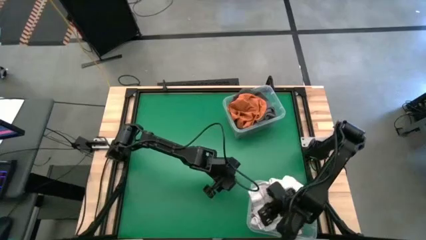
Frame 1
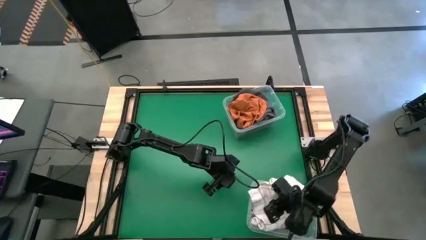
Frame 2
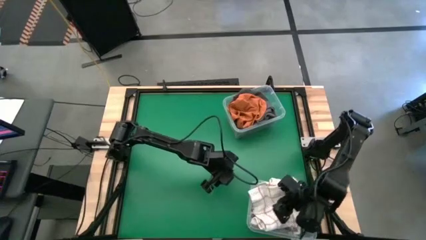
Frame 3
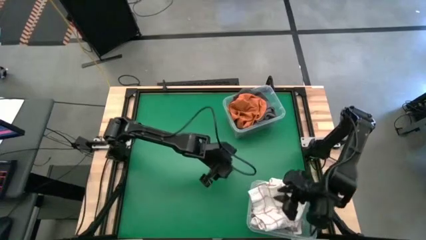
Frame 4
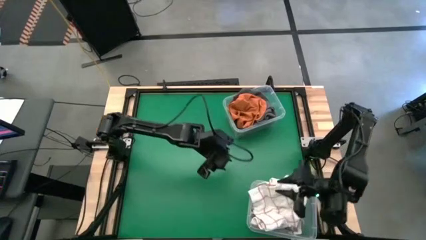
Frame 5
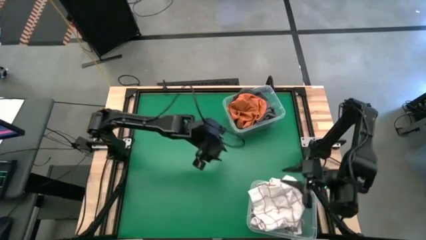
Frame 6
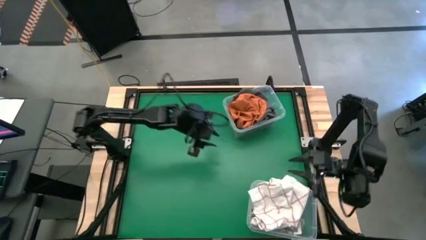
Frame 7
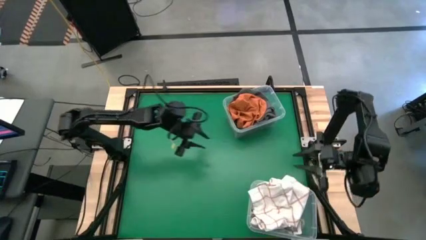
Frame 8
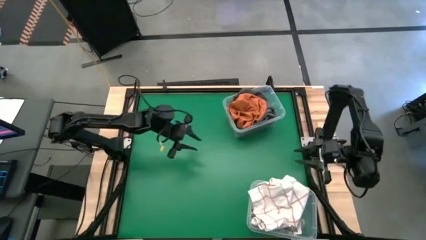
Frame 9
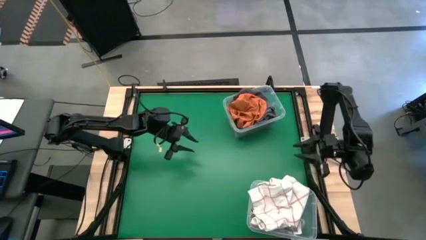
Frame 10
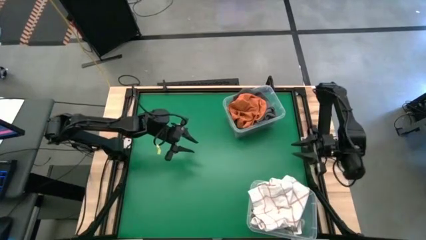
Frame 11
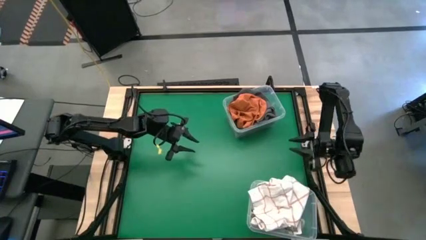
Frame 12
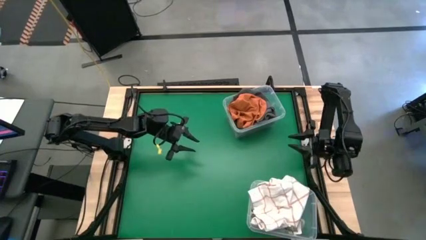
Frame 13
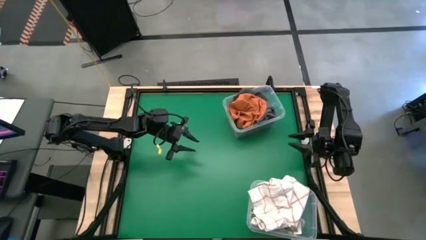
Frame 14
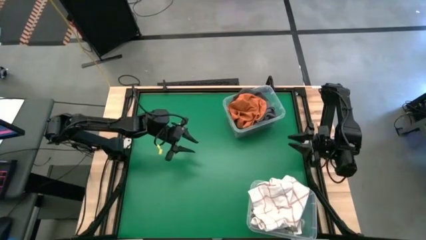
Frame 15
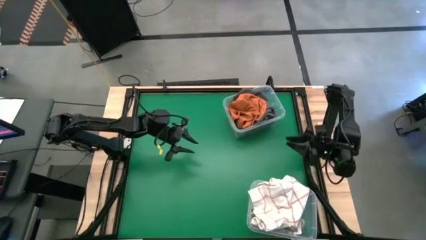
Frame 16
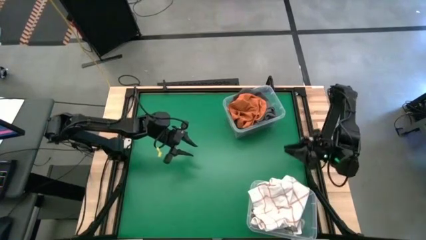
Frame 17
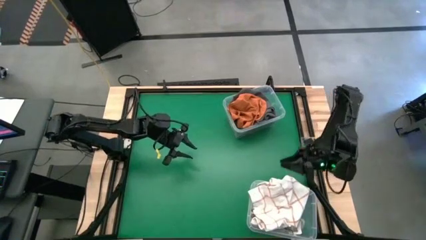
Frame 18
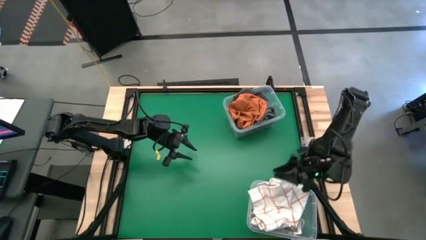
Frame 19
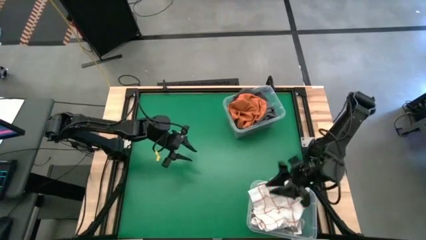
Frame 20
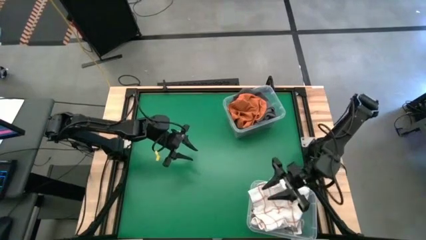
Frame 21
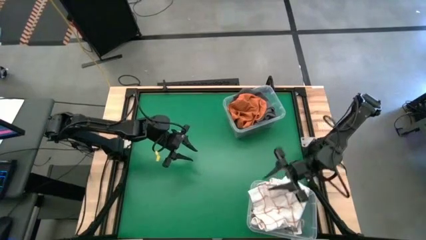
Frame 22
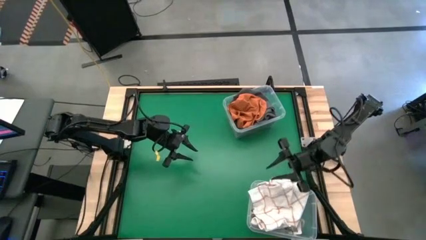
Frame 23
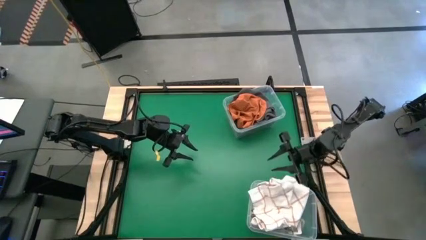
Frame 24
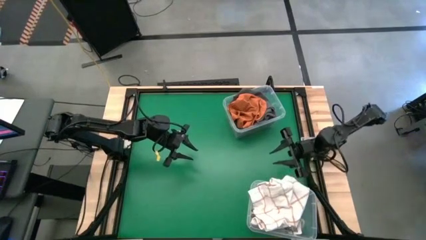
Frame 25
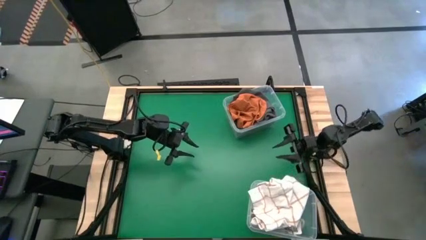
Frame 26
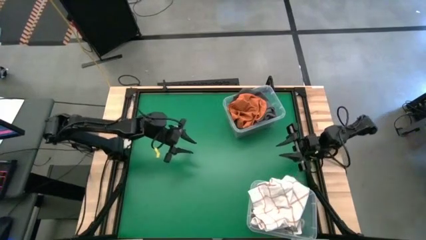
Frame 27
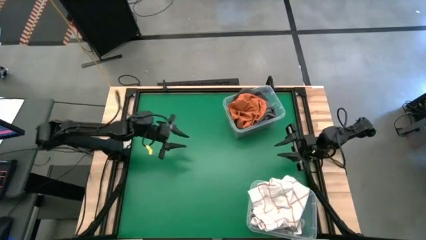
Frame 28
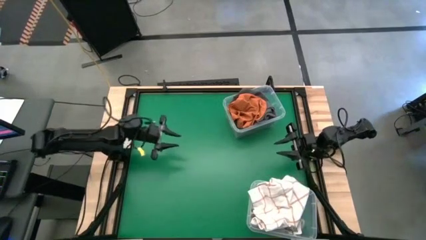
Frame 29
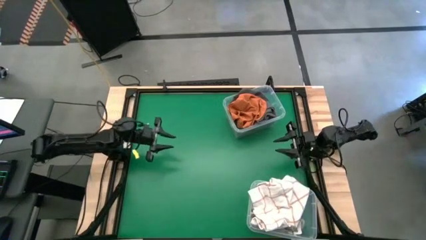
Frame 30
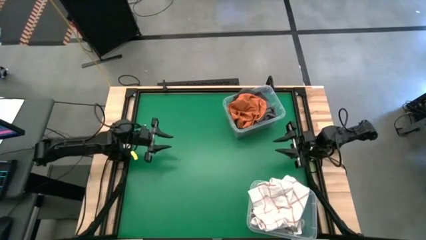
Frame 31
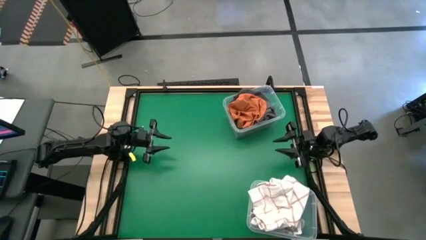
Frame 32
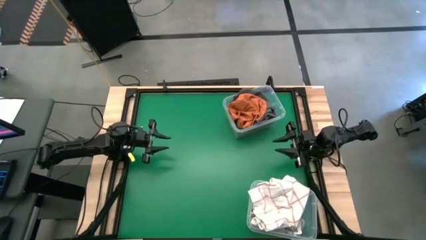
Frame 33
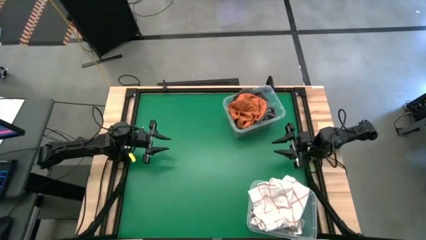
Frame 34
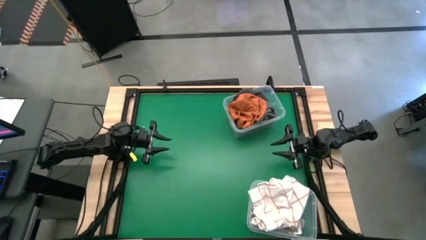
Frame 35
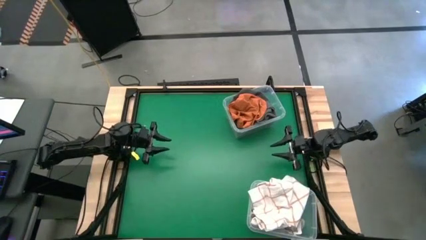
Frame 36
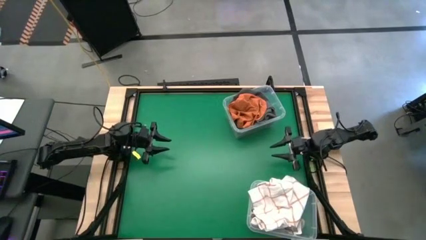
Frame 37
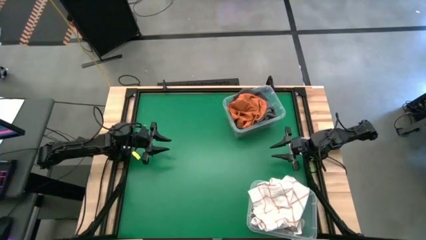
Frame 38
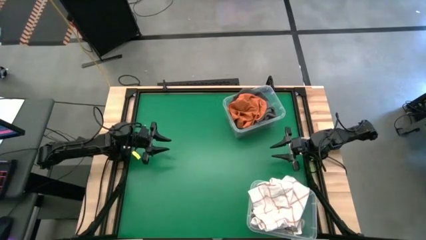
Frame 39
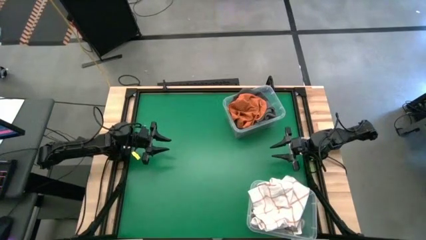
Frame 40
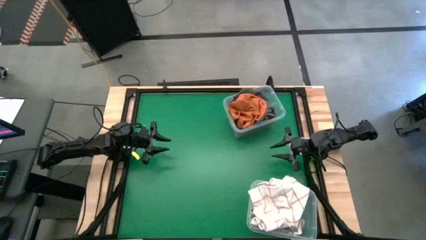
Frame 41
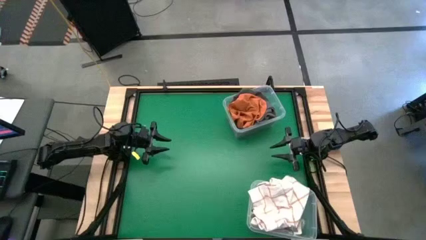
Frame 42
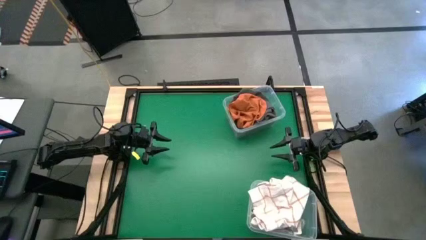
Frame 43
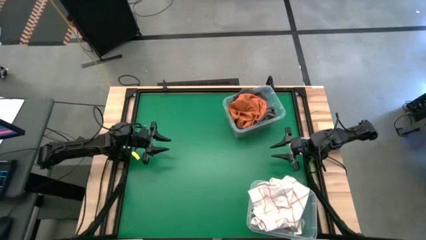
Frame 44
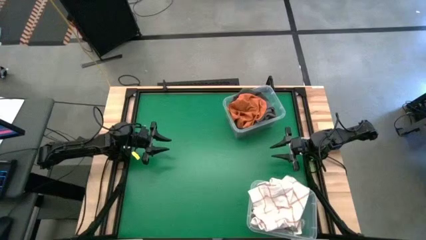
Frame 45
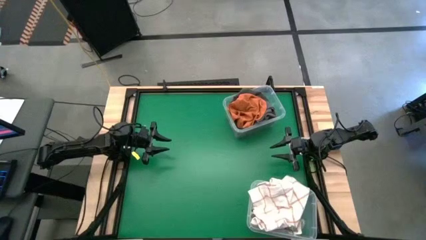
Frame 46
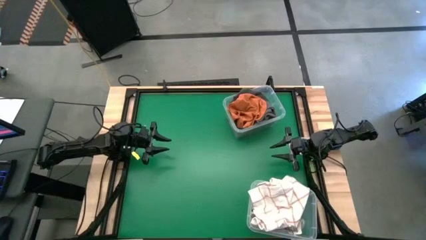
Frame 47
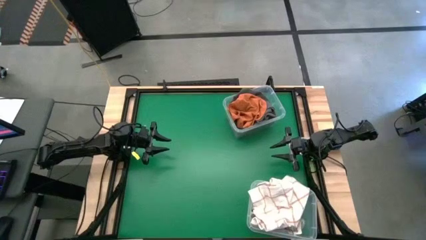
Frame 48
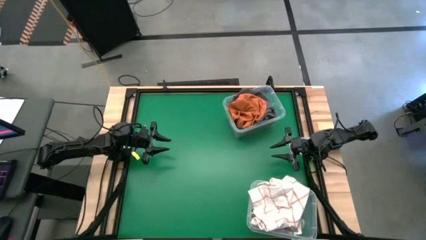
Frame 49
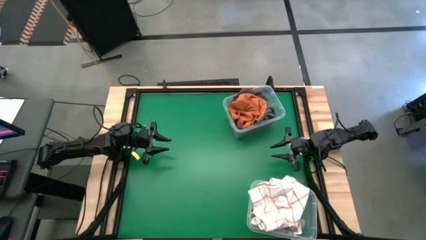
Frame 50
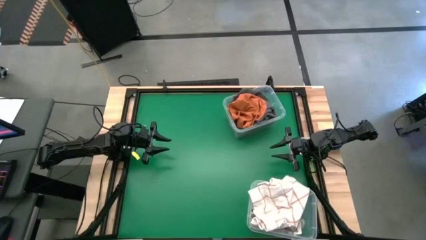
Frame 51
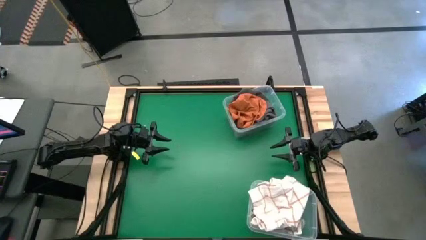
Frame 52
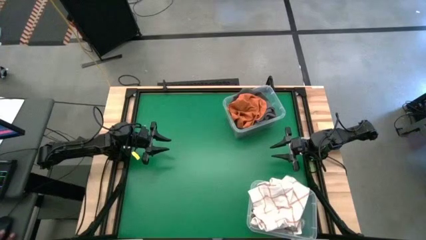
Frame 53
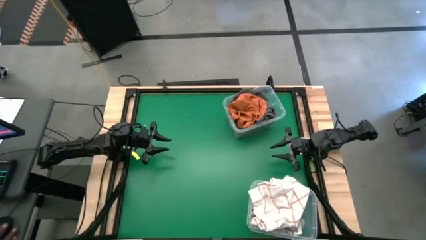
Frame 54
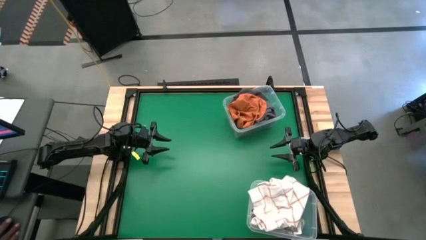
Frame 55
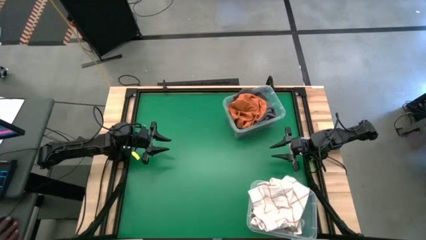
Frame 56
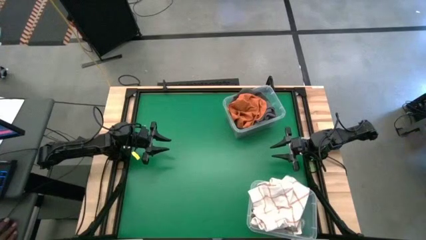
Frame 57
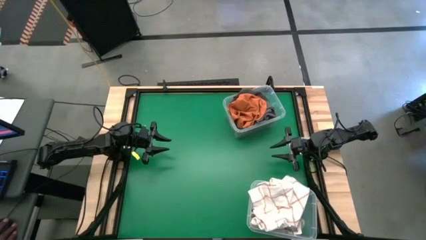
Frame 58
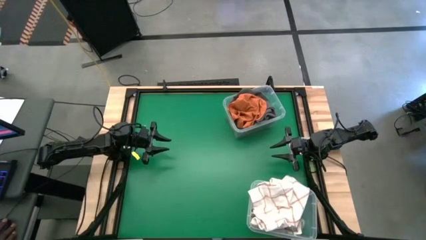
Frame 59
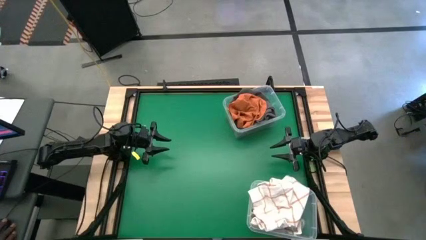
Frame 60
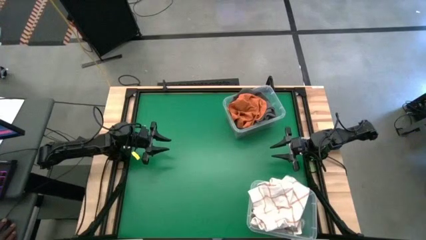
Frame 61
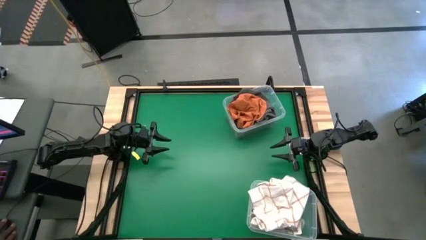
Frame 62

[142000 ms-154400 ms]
Task: Sort towels by color in basket
Return to Home Position
